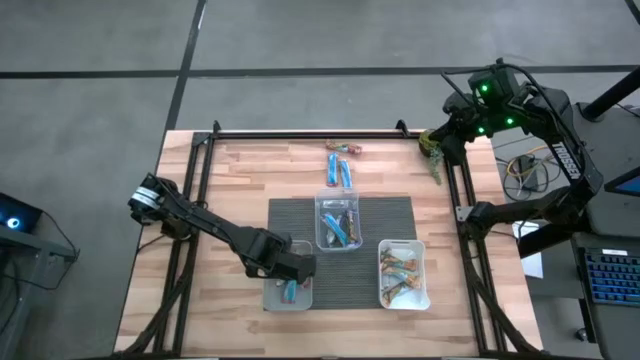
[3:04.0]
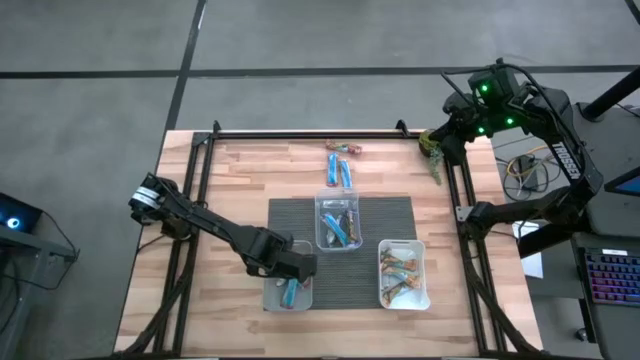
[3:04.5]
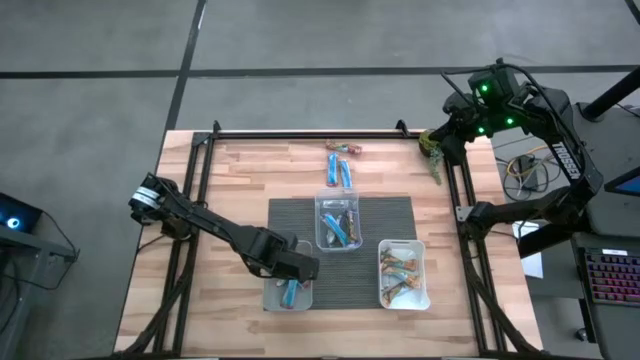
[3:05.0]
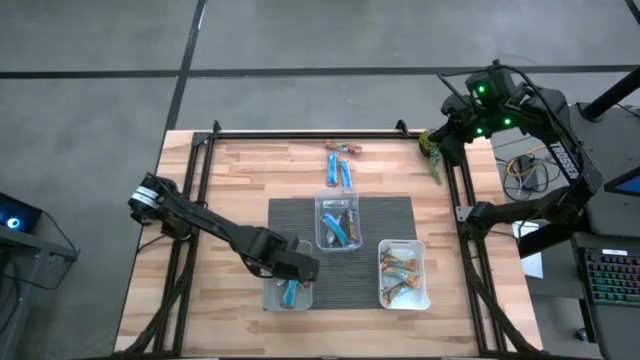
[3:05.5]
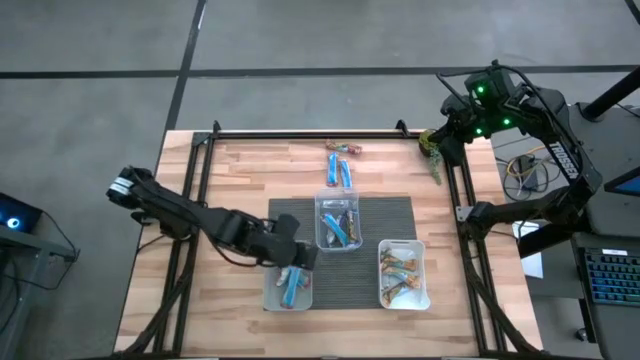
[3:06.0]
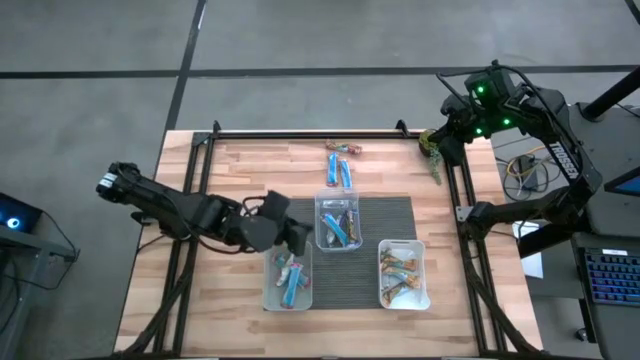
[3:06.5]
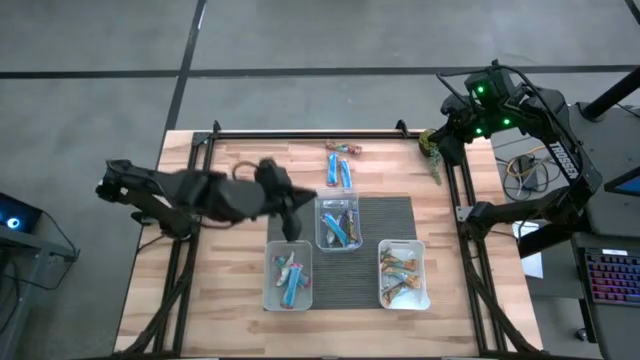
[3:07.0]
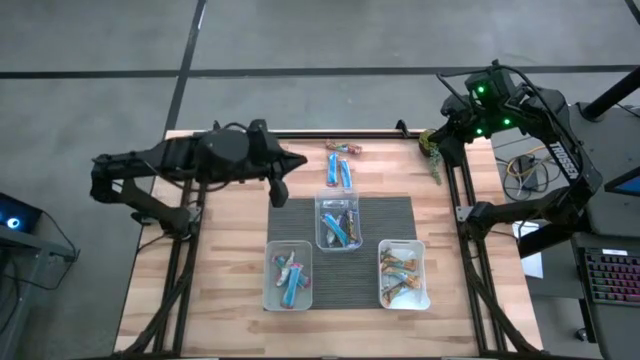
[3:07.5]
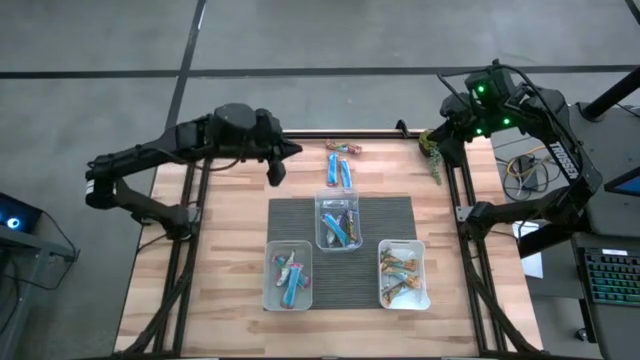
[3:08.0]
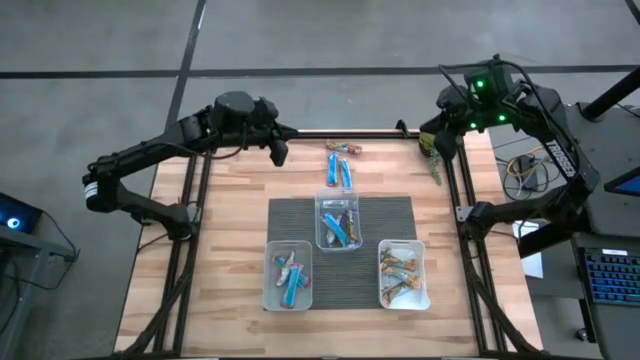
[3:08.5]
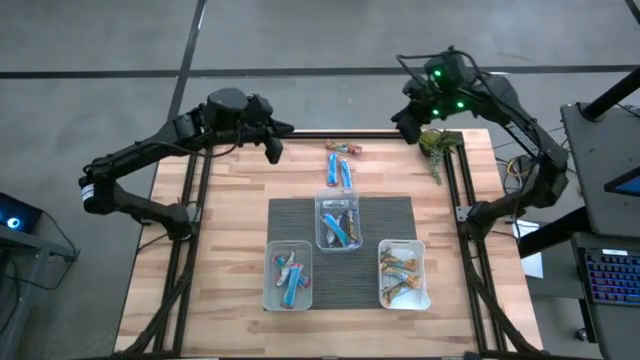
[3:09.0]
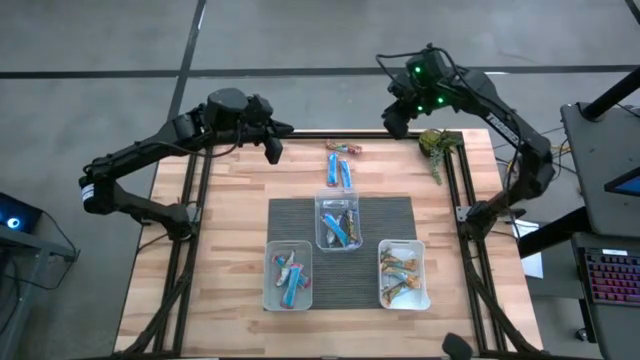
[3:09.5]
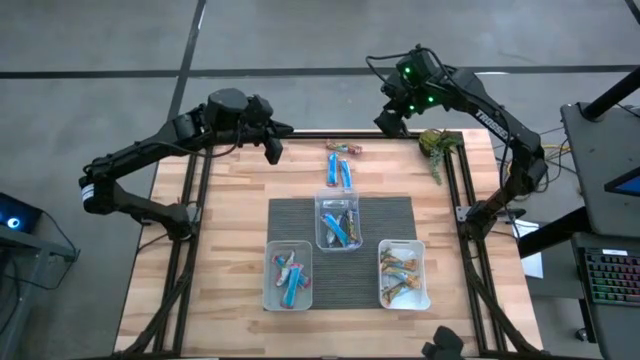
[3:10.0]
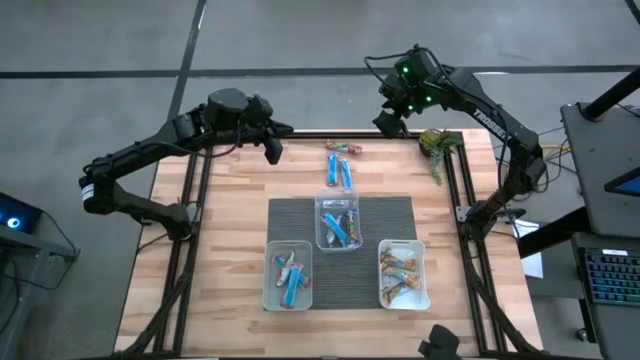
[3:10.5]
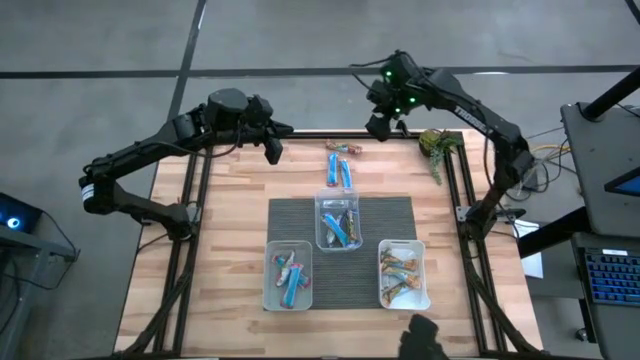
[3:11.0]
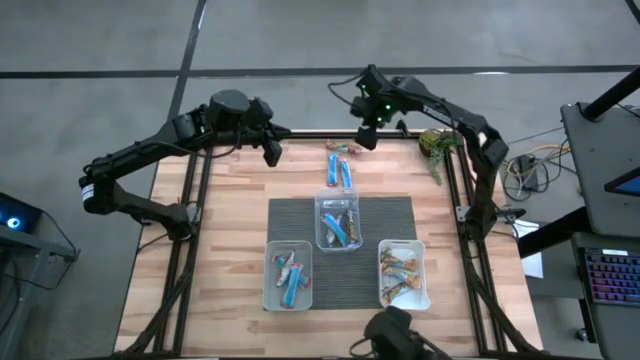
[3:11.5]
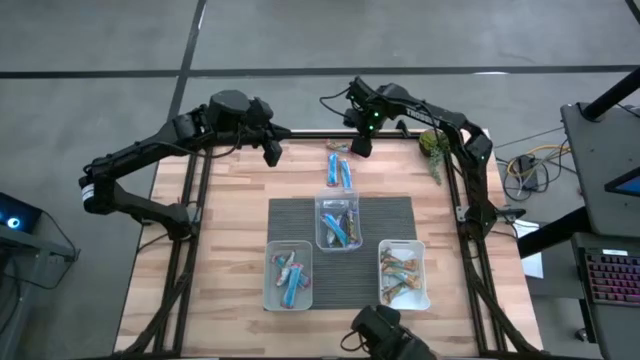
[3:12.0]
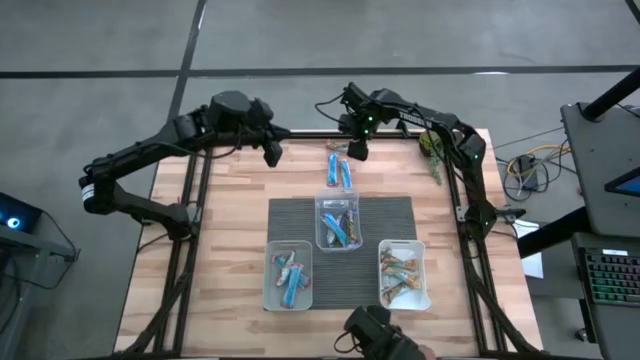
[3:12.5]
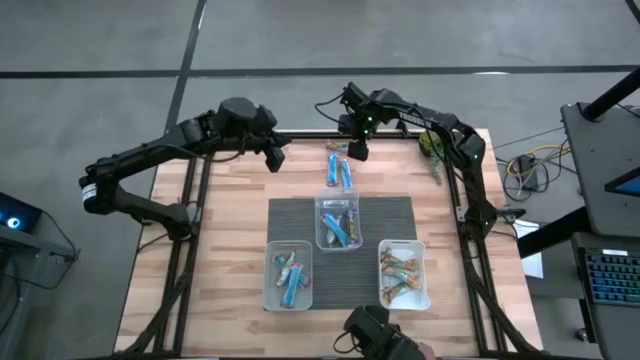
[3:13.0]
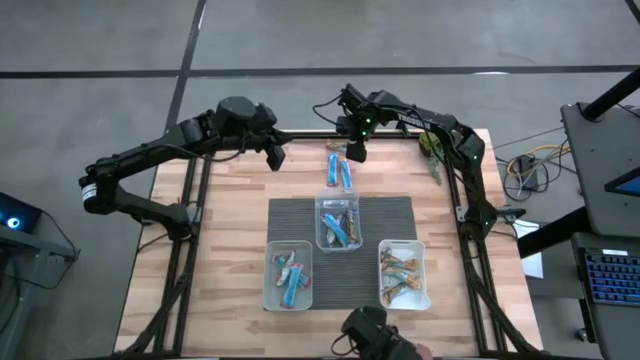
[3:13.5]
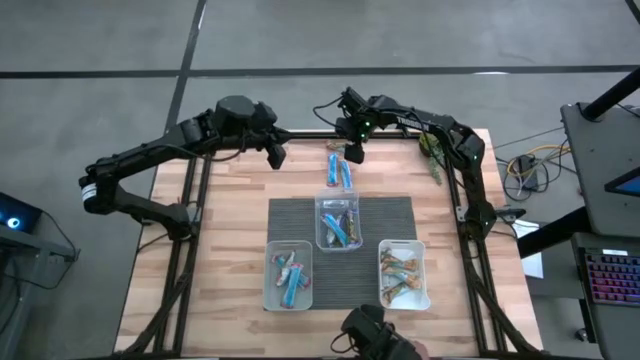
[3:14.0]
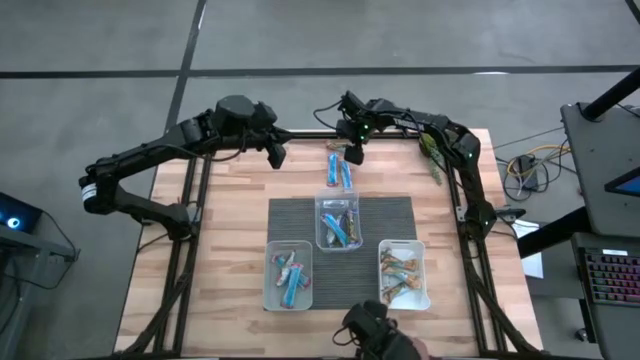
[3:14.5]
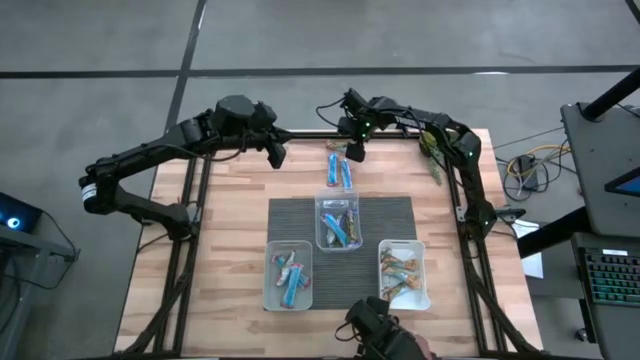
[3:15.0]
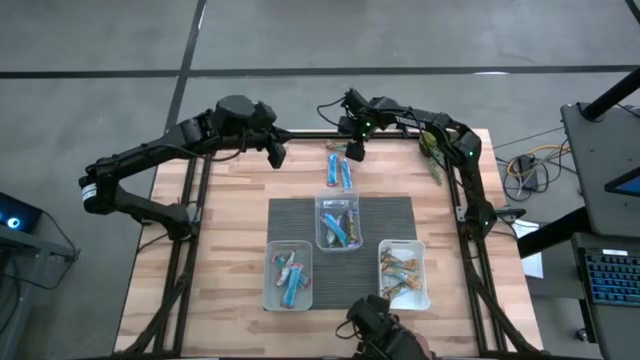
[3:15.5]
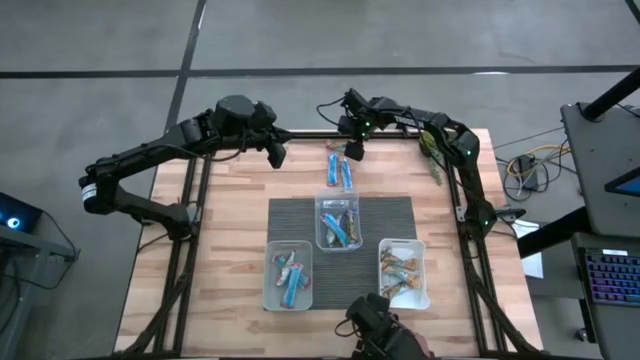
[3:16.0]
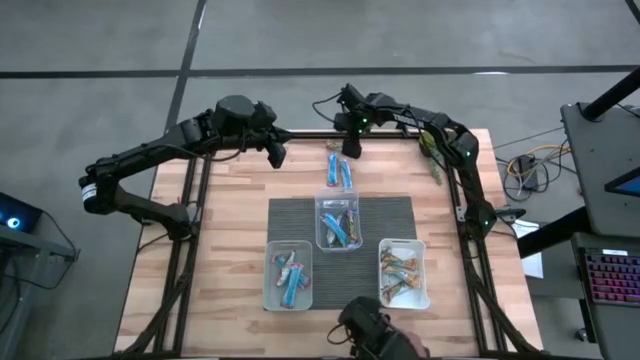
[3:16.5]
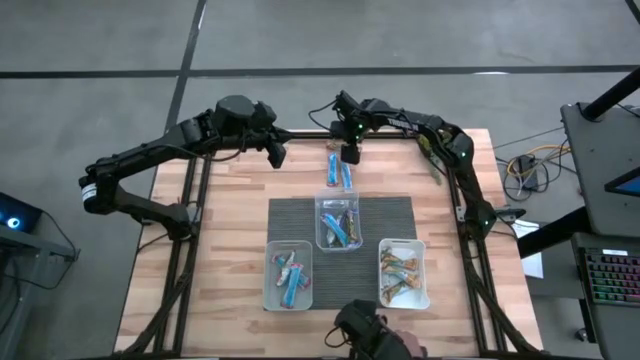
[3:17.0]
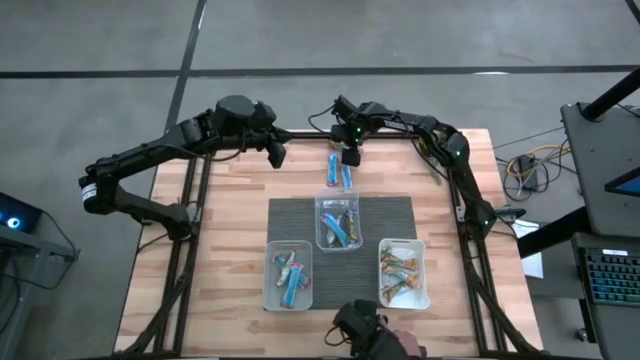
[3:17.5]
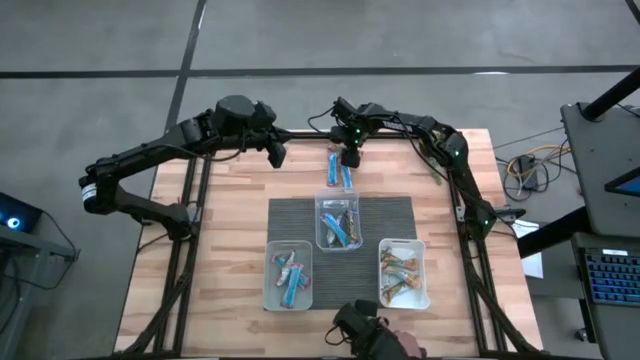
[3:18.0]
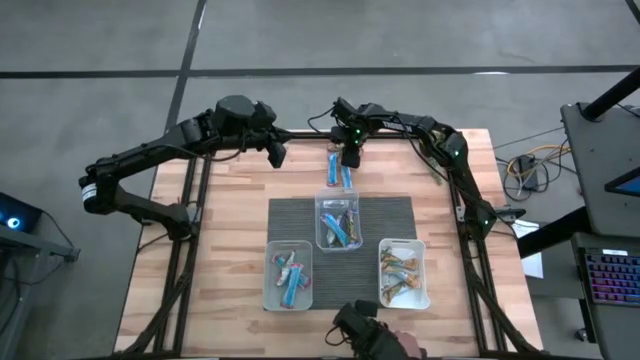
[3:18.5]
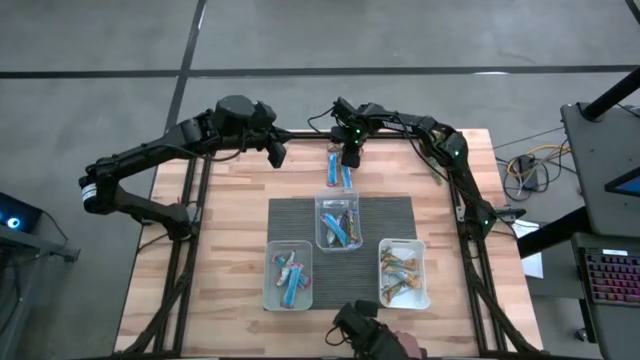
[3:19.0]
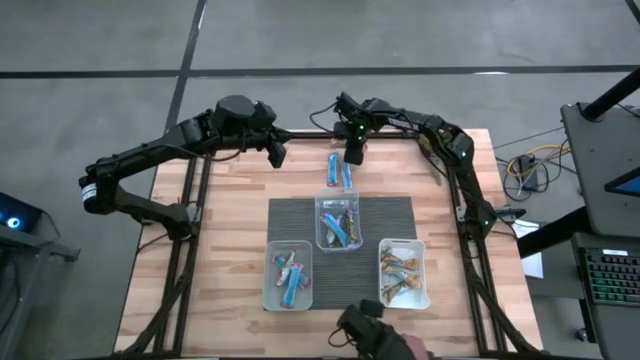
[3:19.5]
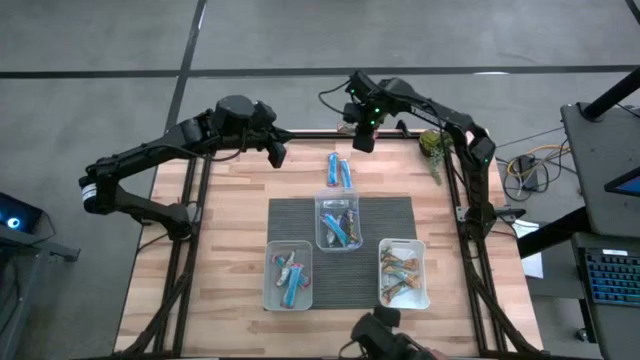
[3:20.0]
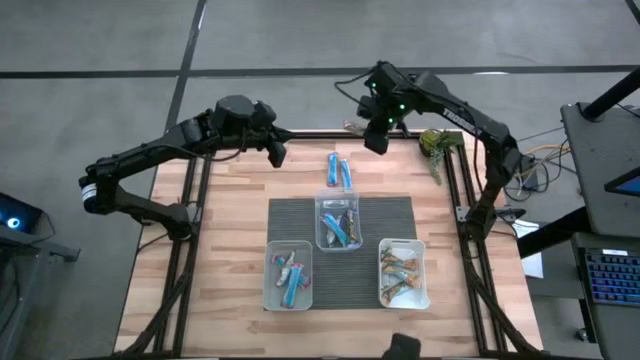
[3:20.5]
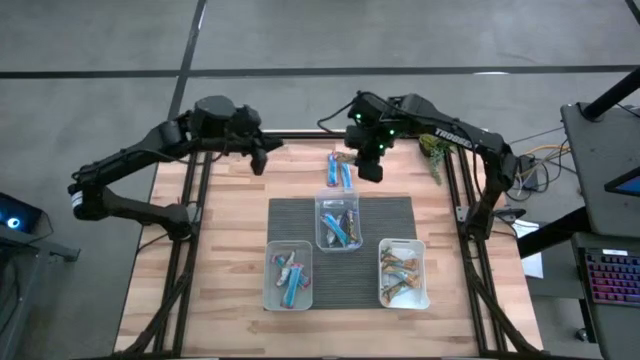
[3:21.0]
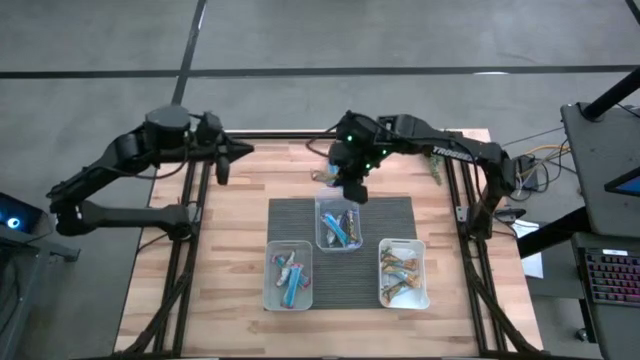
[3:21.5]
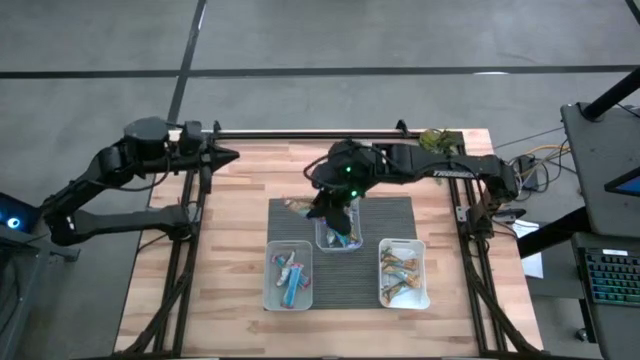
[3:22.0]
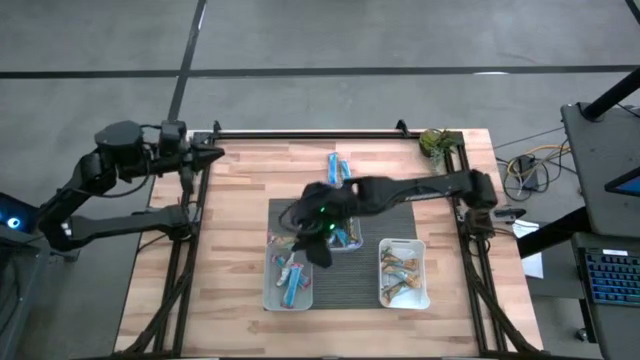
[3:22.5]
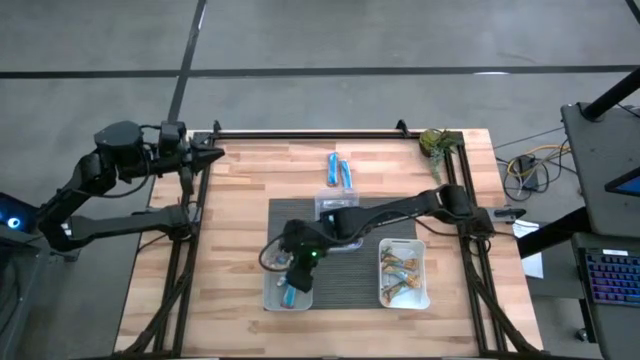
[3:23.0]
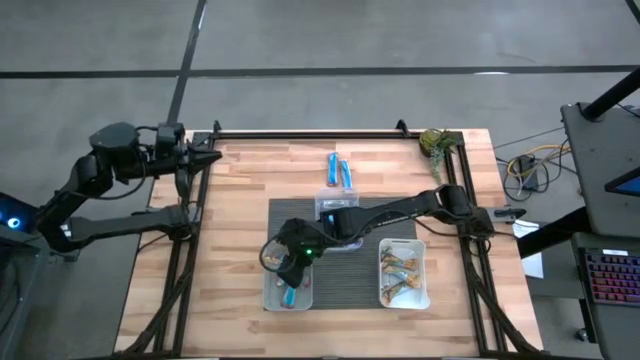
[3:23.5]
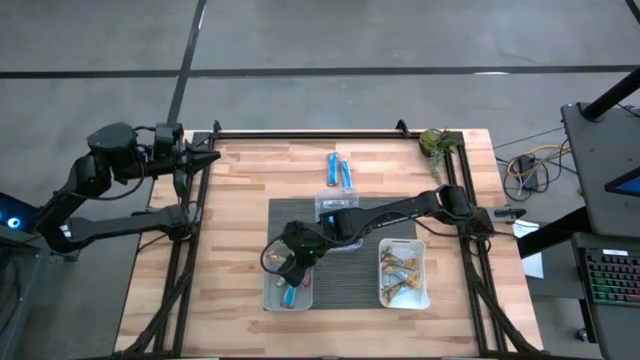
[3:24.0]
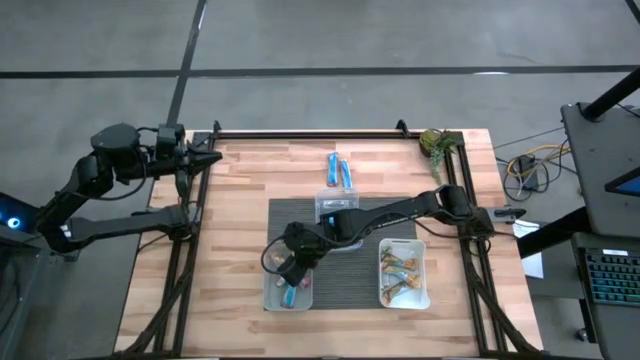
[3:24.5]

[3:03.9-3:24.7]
Task: Pick and place Granola Bars by type
Put the red granola bar into the gray bin

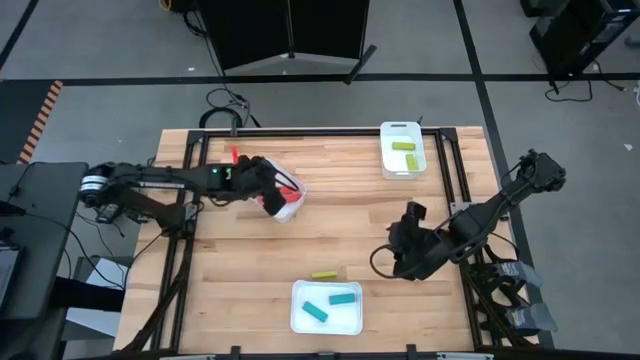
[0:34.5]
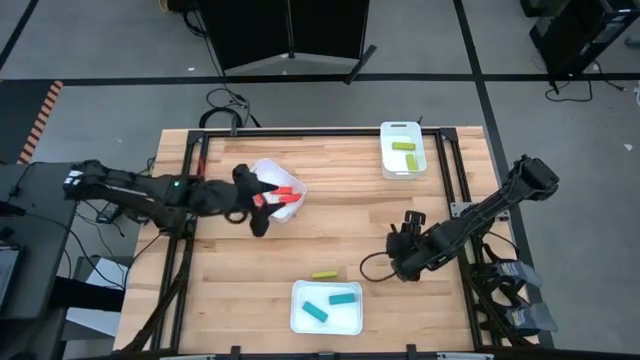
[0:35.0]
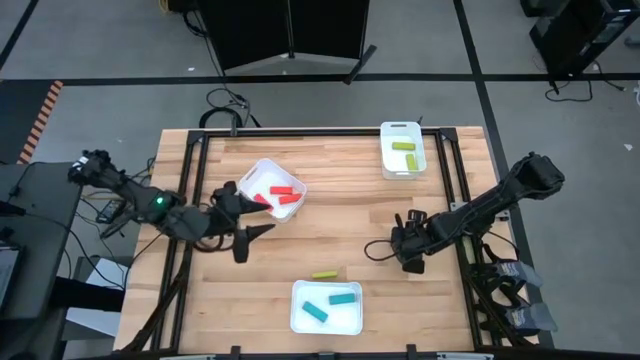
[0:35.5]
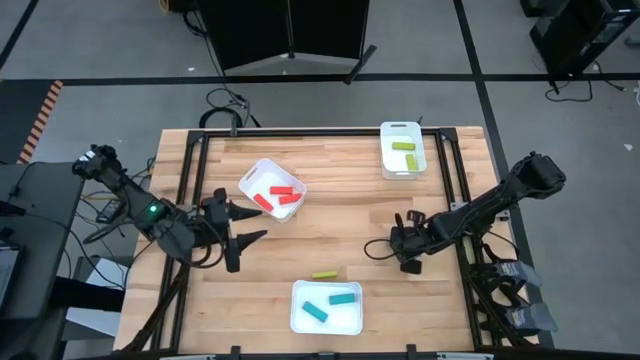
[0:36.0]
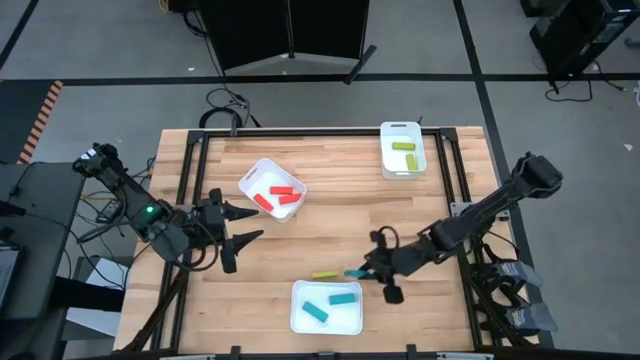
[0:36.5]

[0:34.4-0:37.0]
Task: Sort blocks
Put the blue block into the bottom center bin
